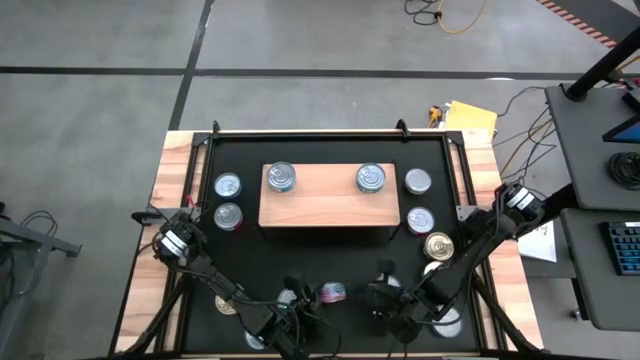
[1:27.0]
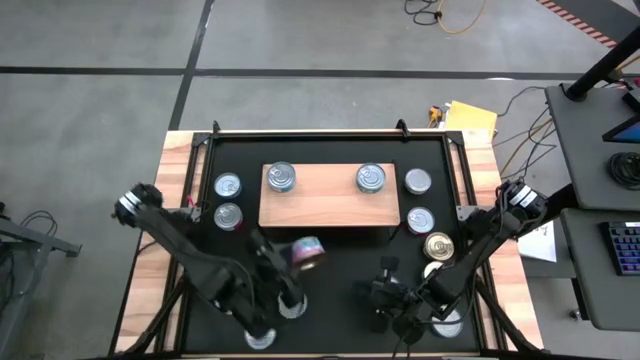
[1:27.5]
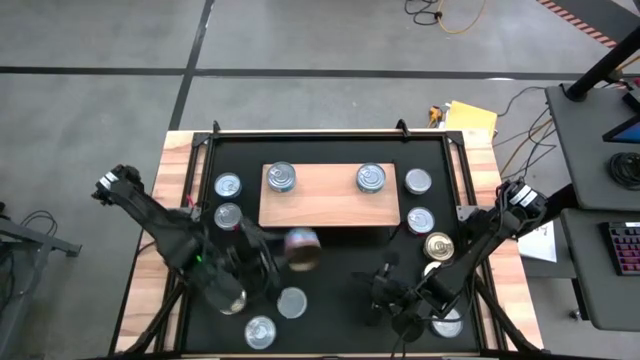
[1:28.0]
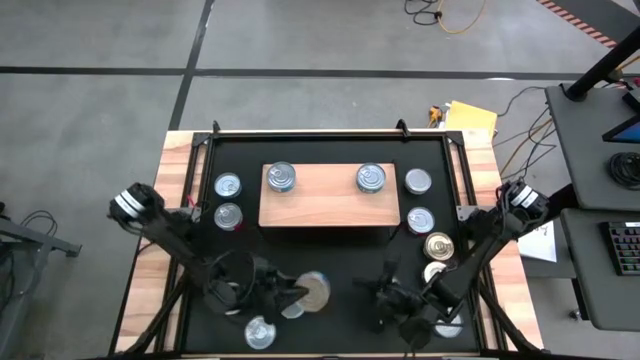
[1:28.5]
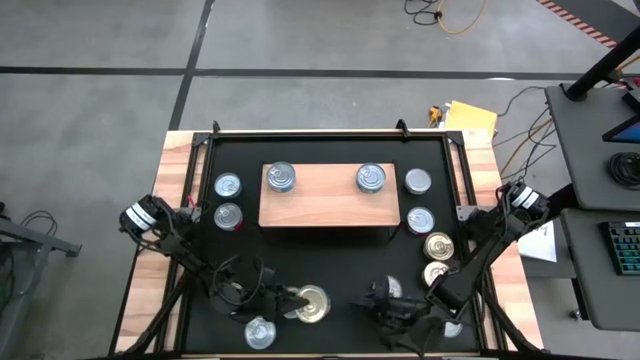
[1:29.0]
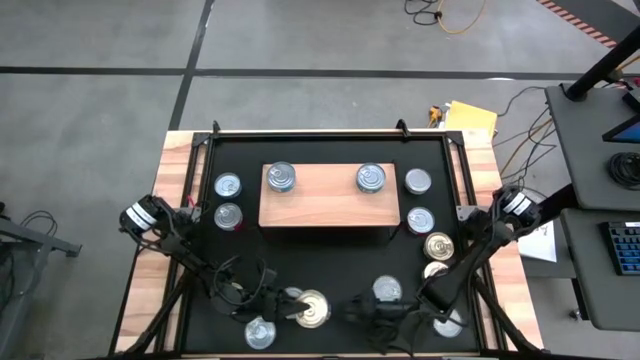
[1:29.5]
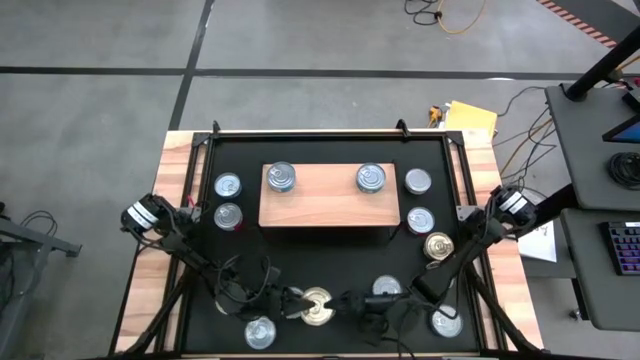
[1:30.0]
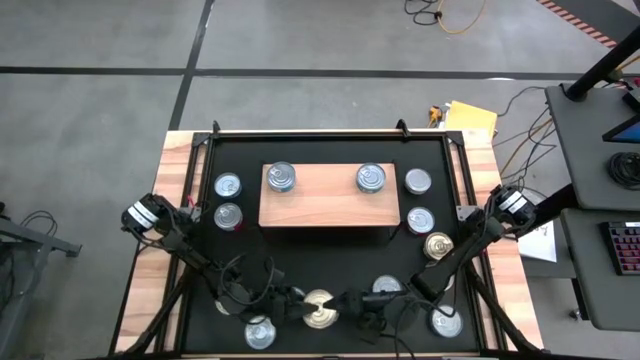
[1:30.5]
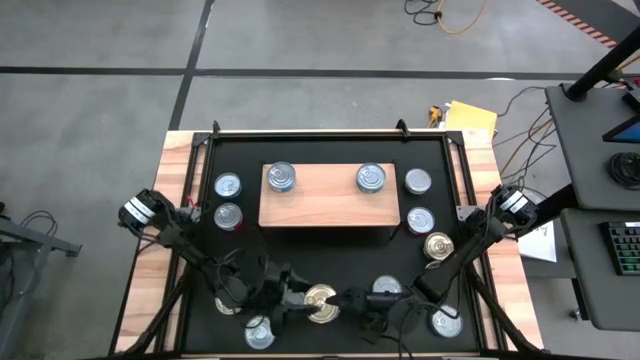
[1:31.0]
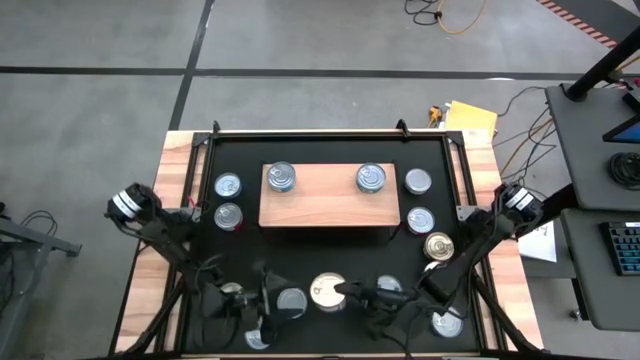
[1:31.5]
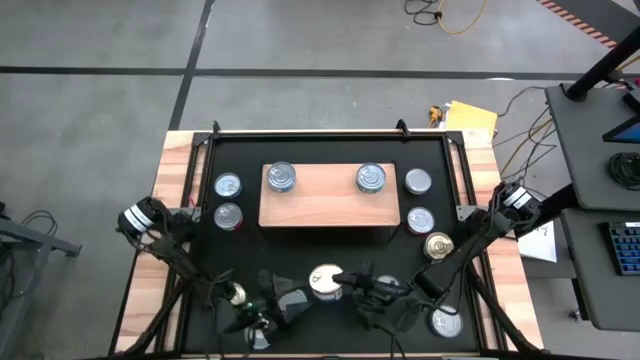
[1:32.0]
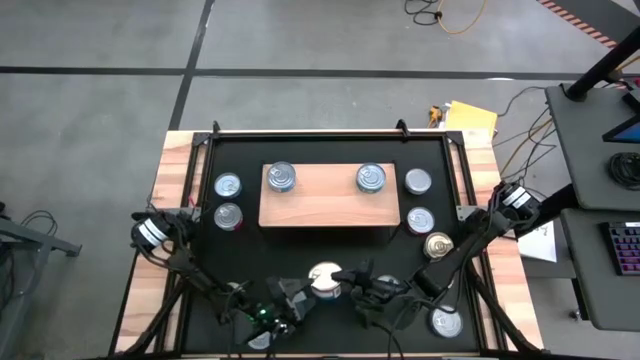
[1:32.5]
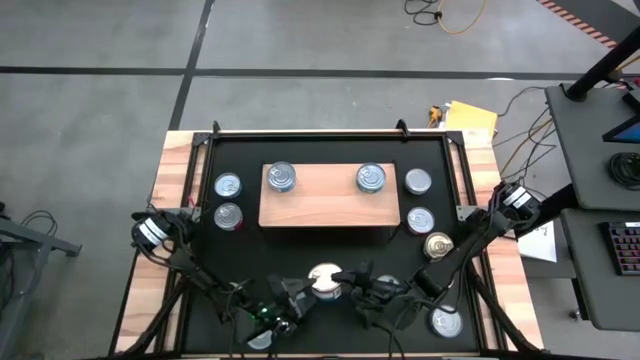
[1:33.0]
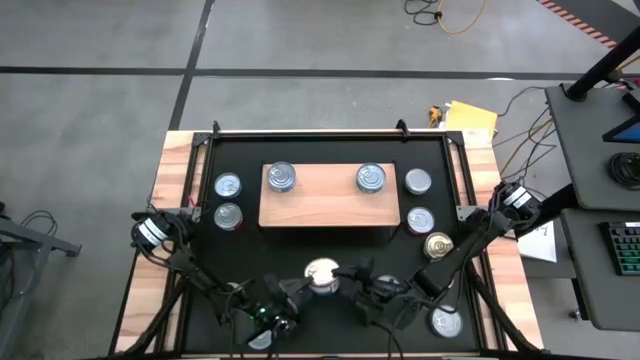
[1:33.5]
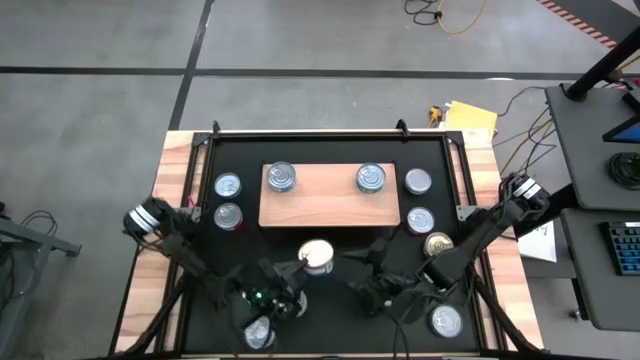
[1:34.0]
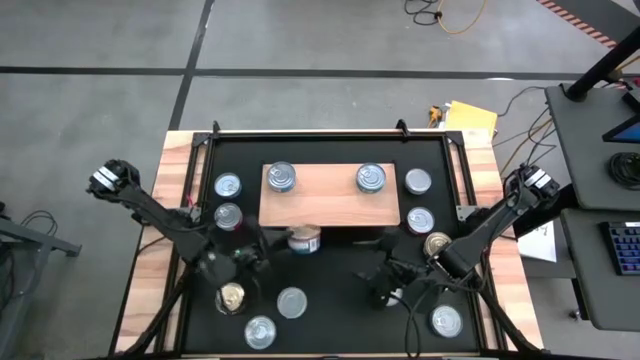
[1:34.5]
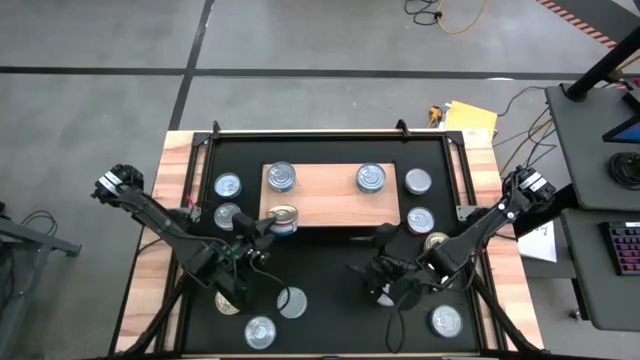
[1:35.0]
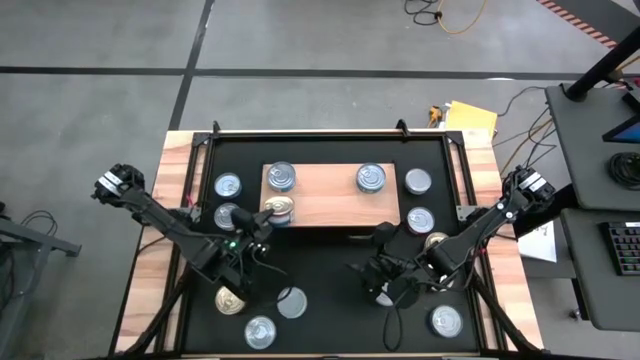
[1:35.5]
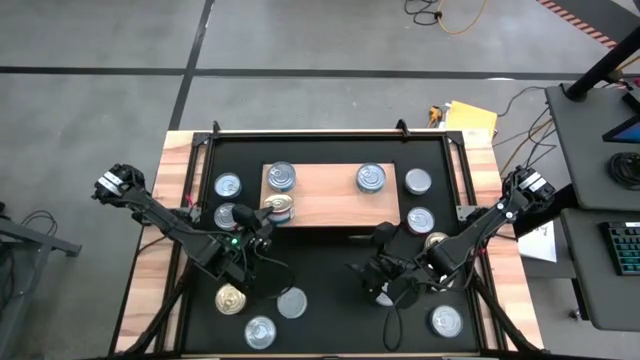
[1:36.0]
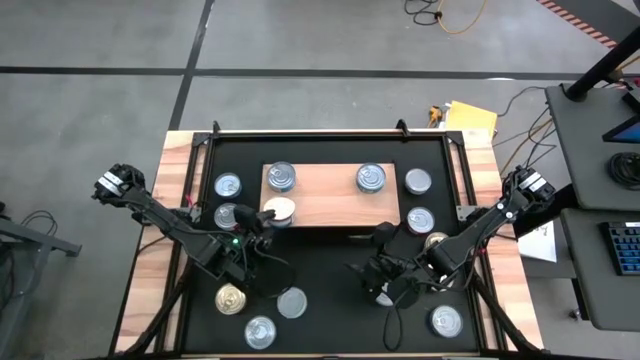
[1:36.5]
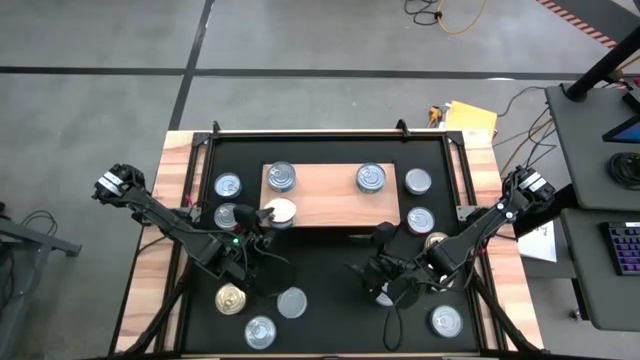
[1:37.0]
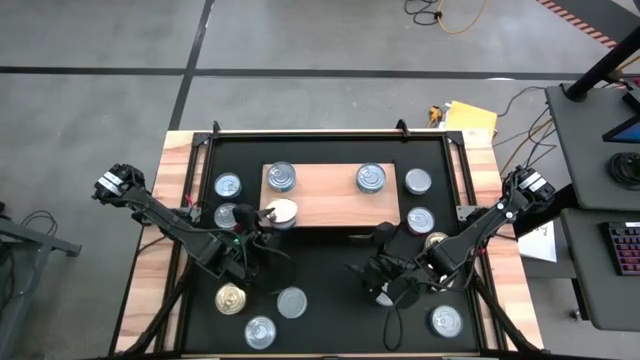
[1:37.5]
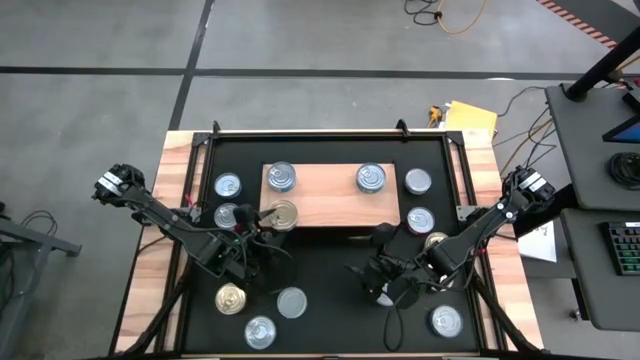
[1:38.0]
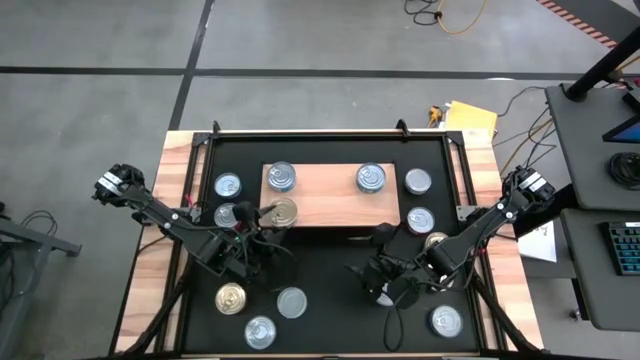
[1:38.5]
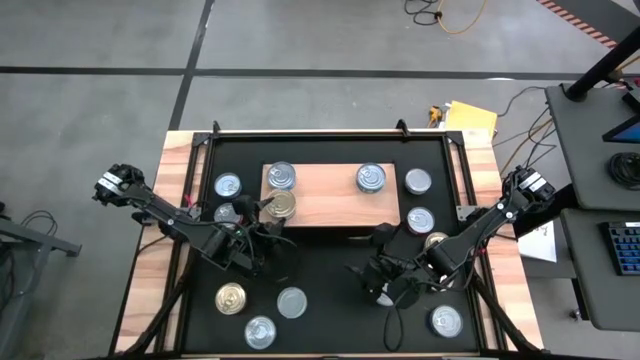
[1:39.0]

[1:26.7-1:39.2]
Task: Stack canned seafood by type on shelf
Put the blue tuna can on the shelf

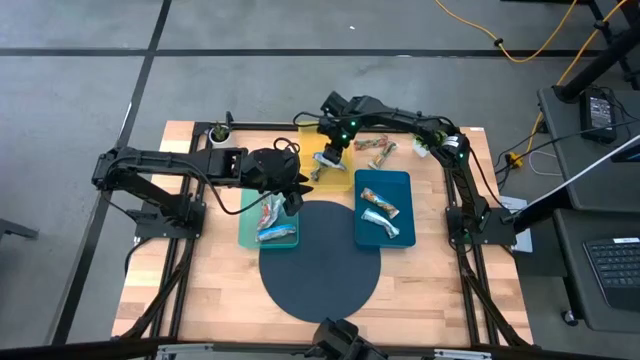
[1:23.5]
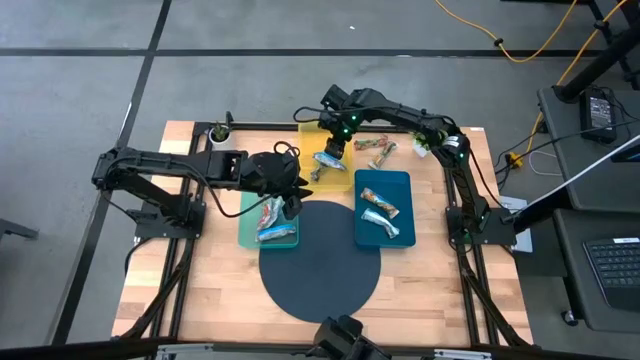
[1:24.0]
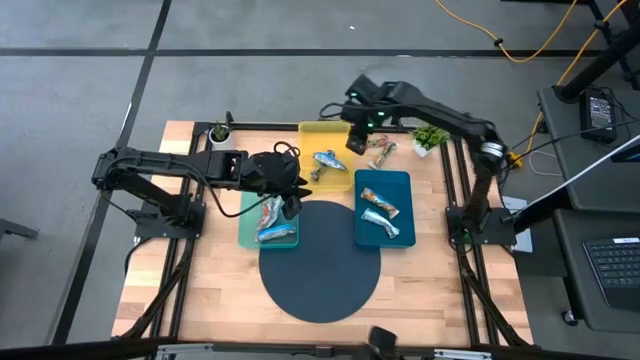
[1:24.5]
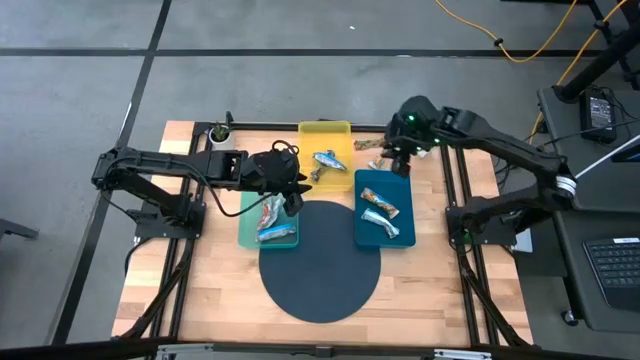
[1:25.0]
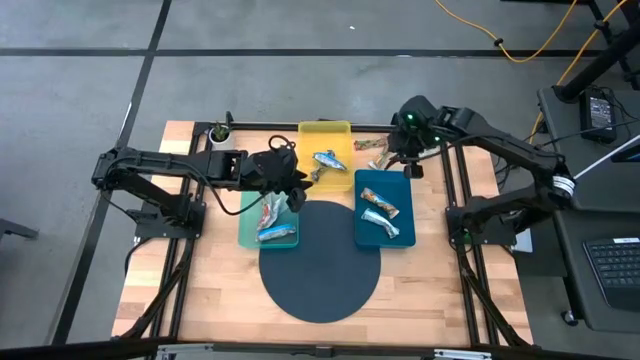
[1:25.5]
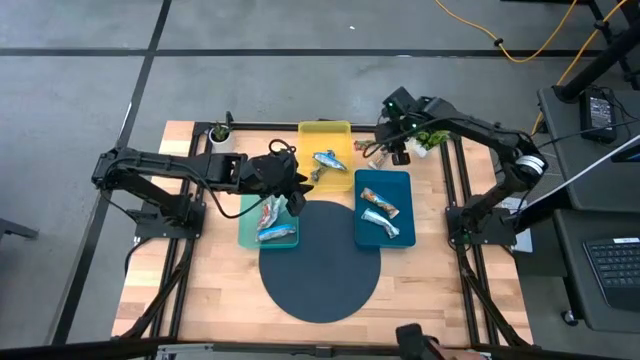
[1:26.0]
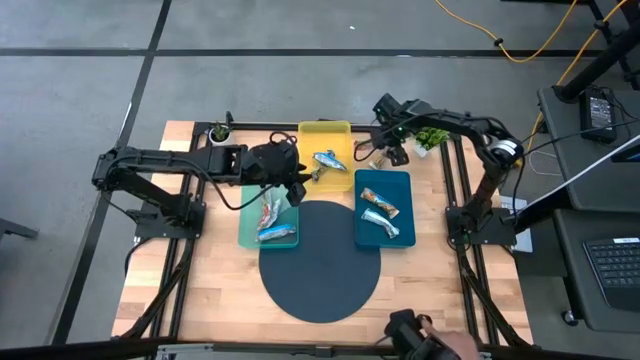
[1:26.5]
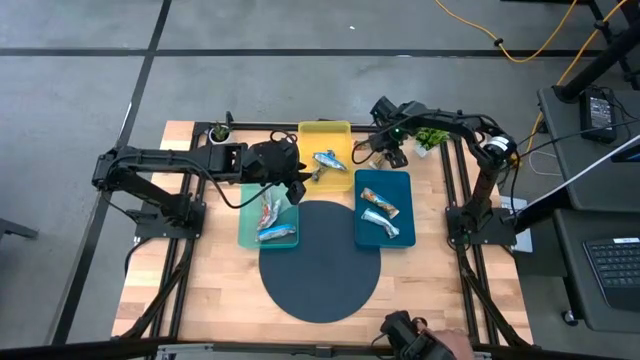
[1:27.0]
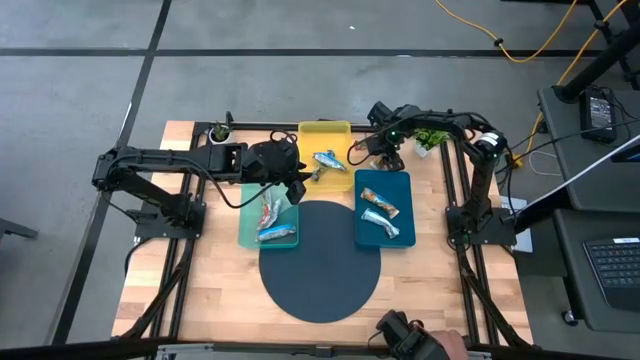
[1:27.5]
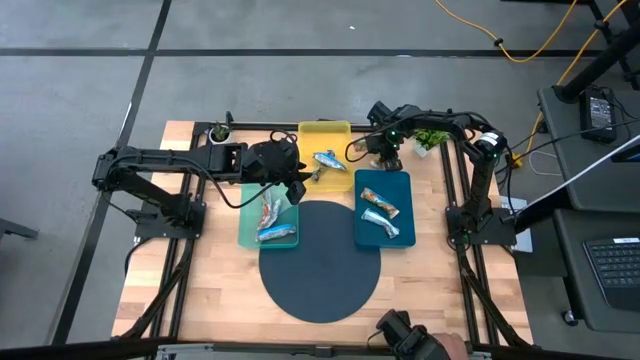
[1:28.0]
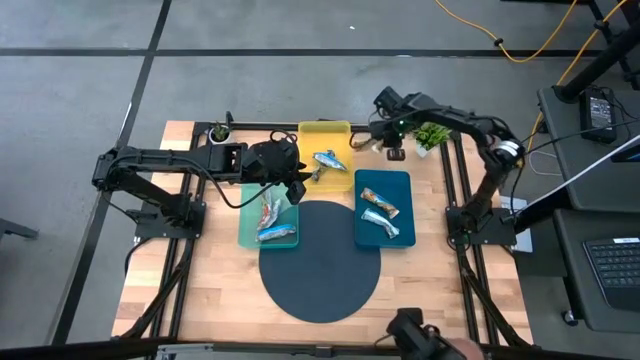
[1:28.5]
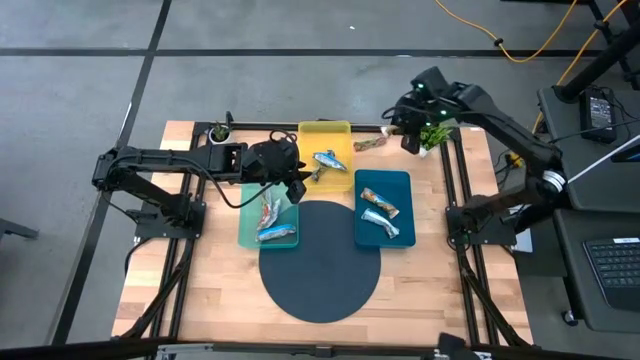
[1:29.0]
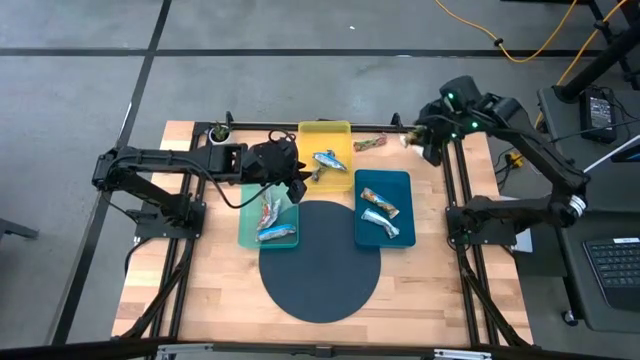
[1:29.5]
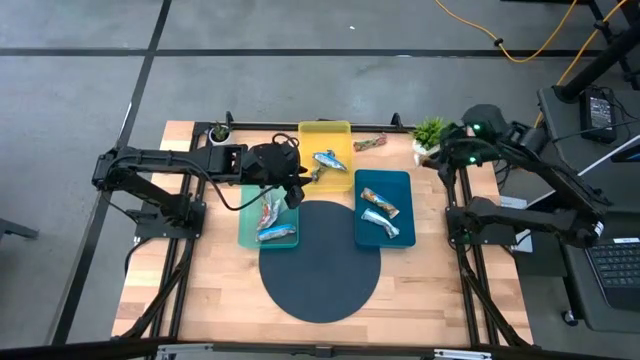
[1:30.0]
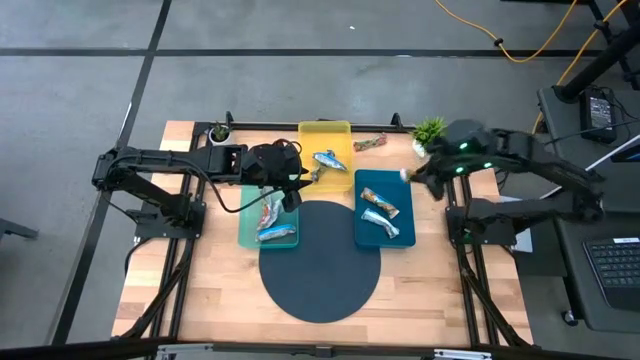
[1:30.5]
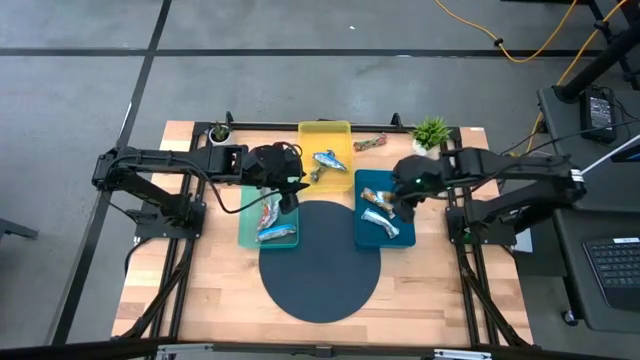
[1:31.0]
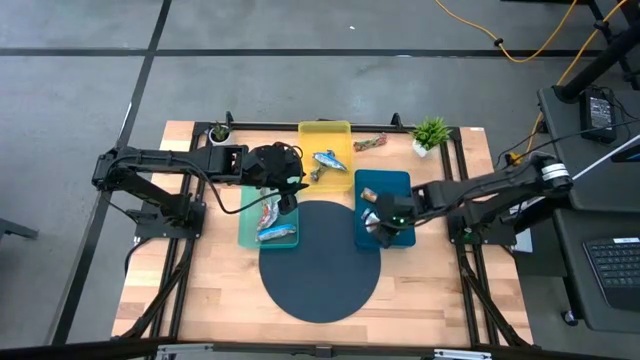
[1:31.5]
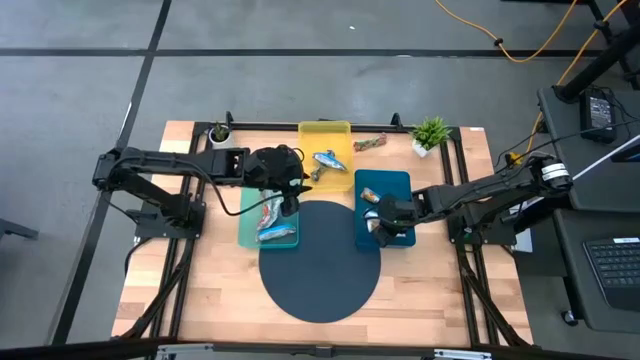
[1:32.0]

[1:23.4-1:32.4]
Task: Pick and place Granola Bars by type
Put the orange granola bar into the blue bin
